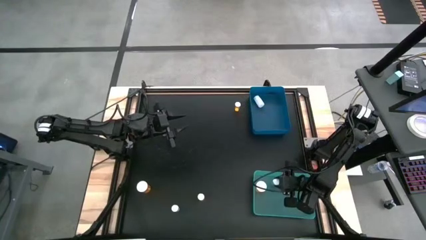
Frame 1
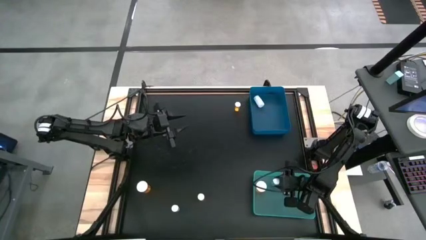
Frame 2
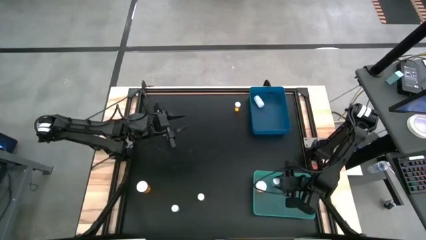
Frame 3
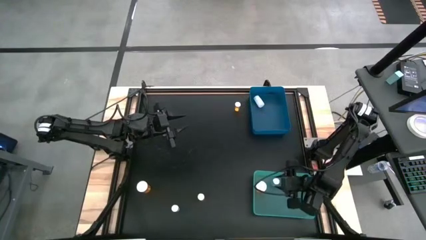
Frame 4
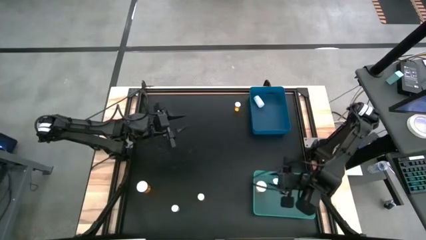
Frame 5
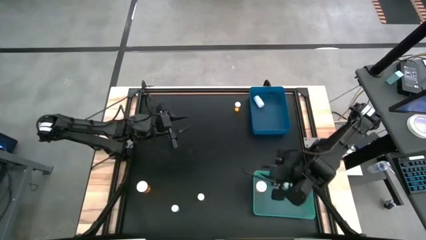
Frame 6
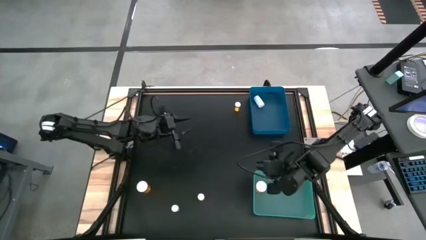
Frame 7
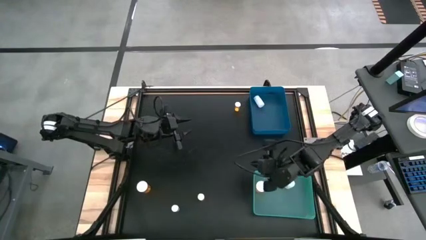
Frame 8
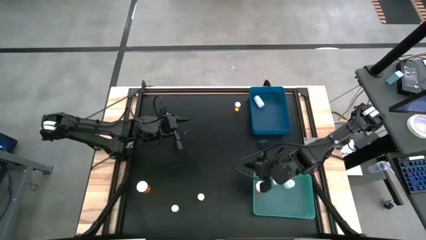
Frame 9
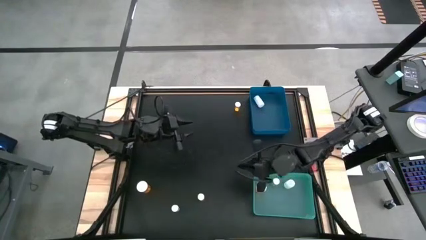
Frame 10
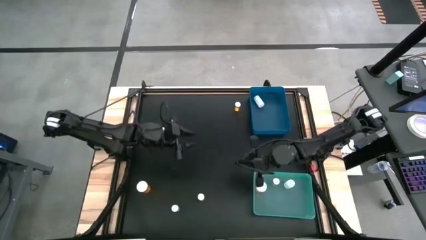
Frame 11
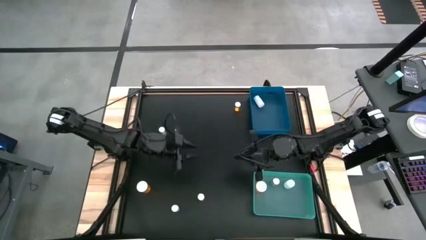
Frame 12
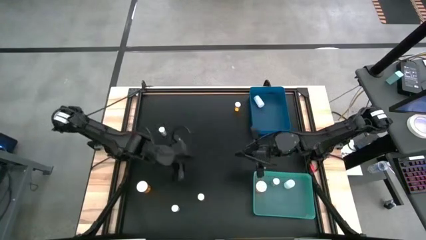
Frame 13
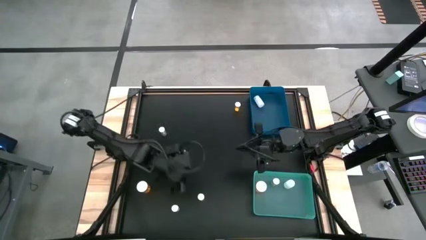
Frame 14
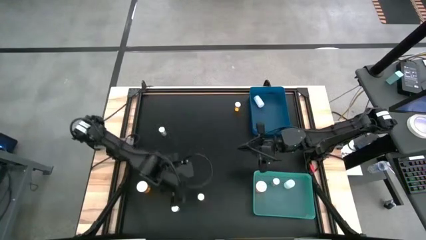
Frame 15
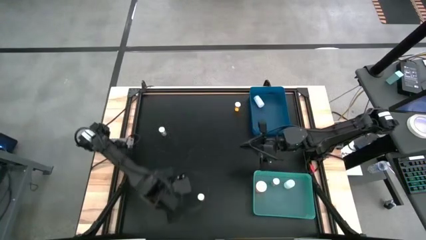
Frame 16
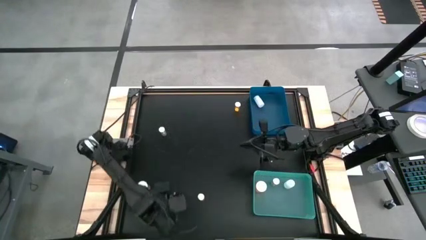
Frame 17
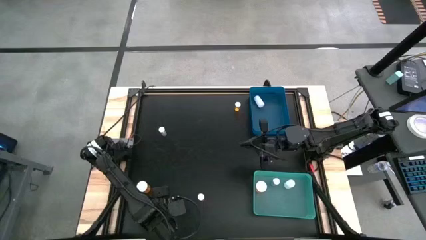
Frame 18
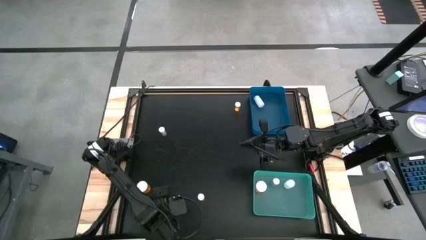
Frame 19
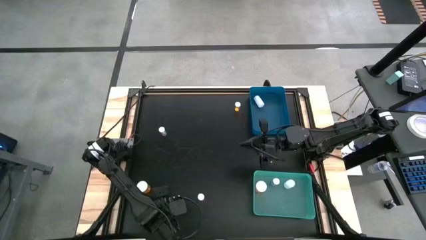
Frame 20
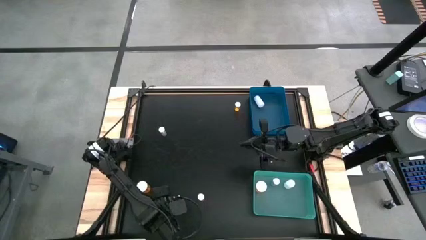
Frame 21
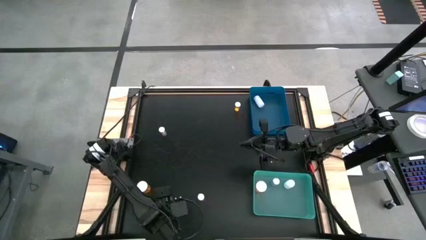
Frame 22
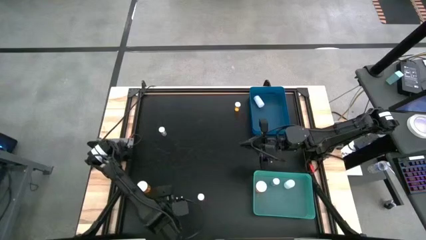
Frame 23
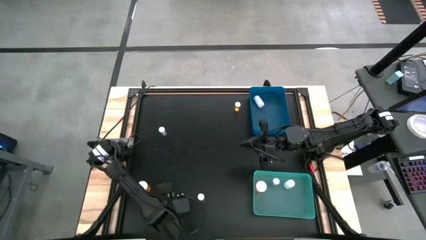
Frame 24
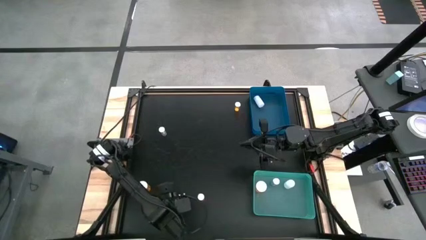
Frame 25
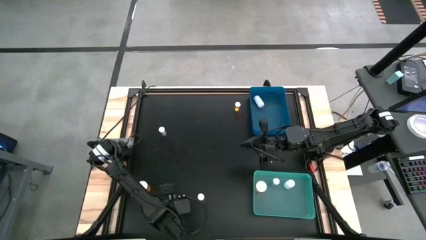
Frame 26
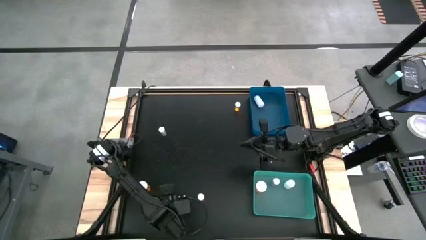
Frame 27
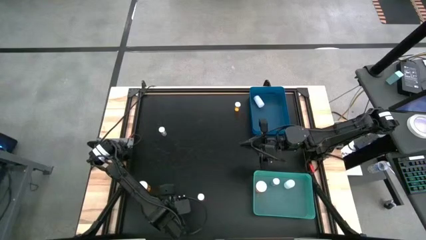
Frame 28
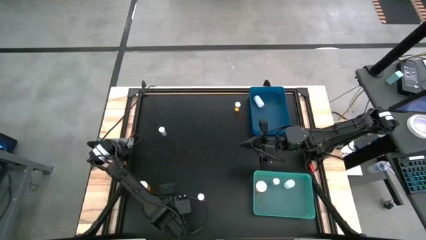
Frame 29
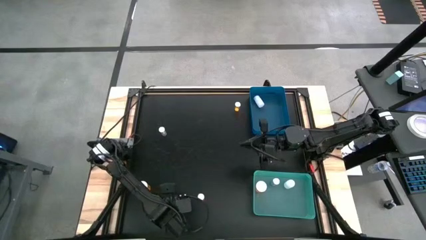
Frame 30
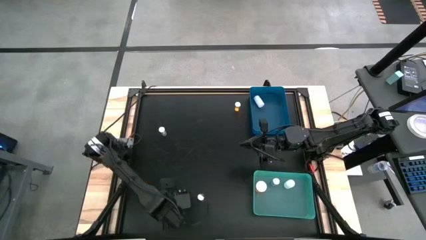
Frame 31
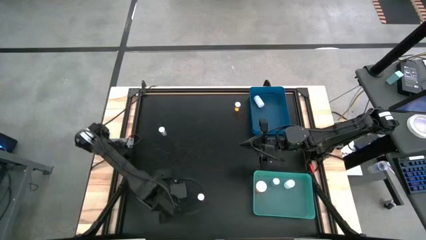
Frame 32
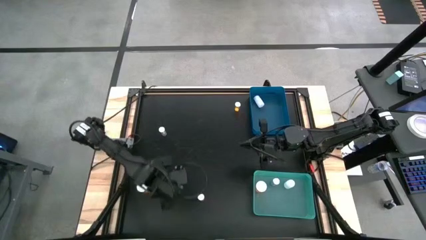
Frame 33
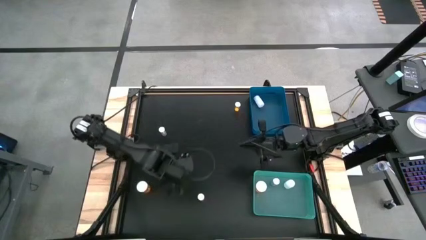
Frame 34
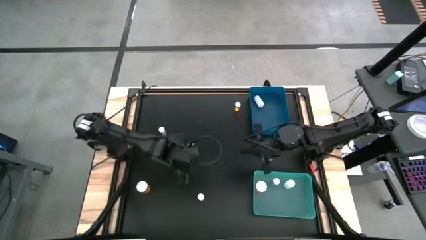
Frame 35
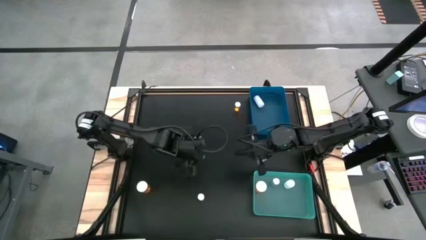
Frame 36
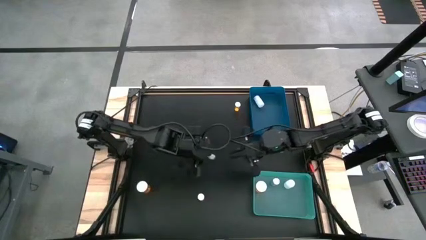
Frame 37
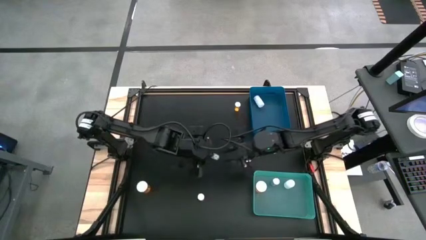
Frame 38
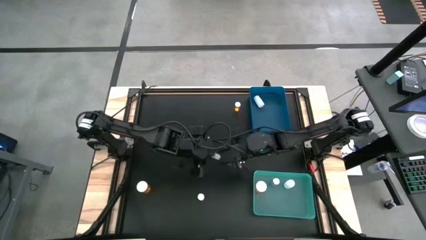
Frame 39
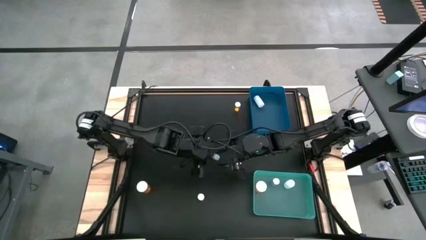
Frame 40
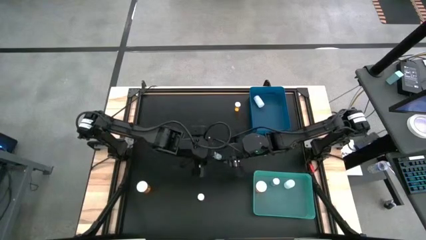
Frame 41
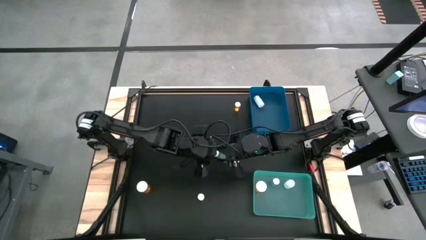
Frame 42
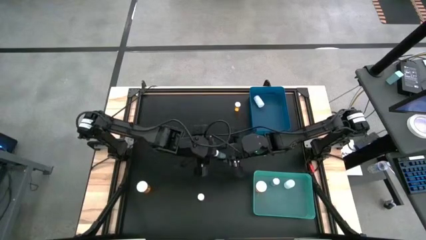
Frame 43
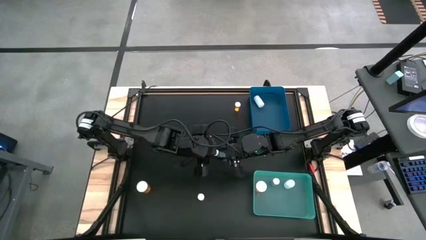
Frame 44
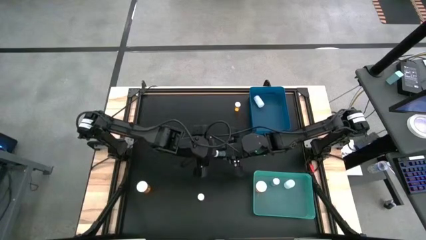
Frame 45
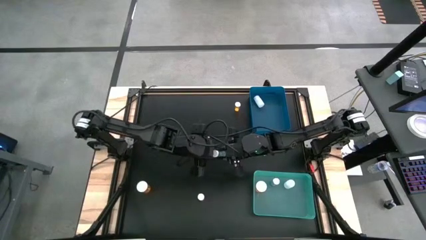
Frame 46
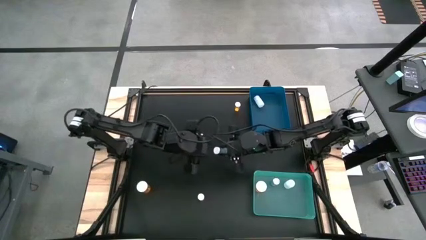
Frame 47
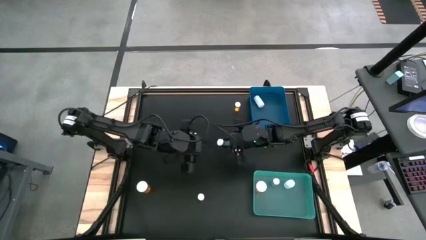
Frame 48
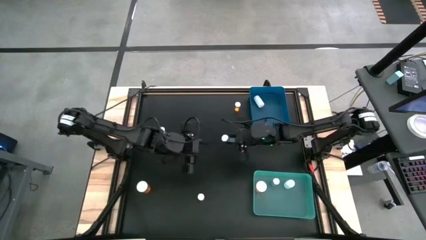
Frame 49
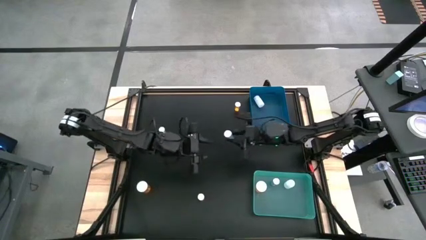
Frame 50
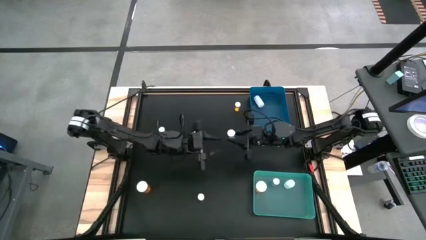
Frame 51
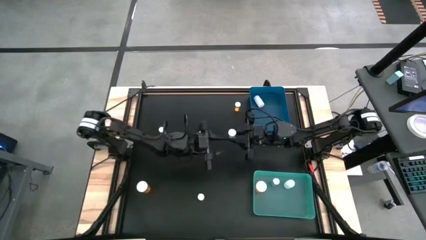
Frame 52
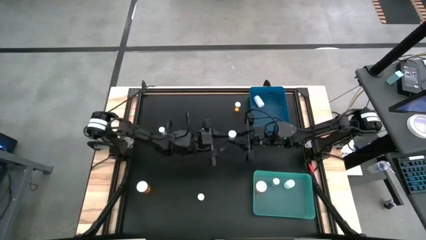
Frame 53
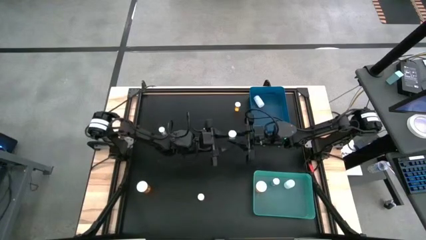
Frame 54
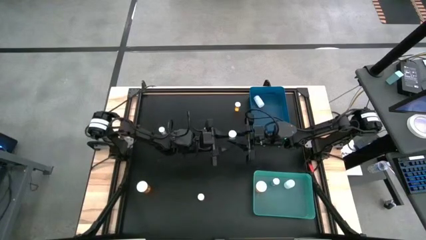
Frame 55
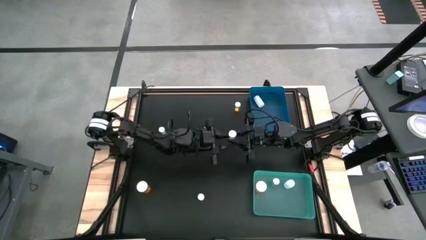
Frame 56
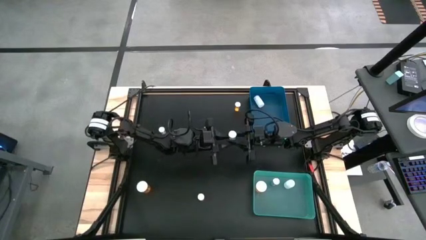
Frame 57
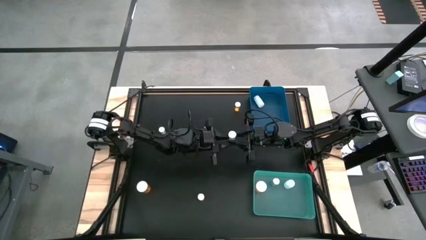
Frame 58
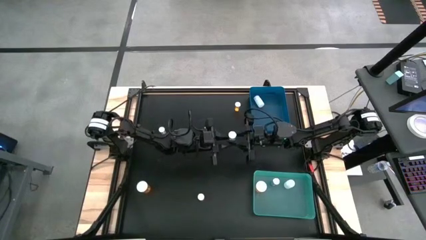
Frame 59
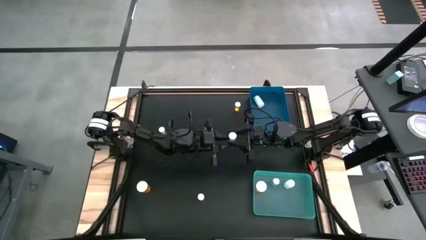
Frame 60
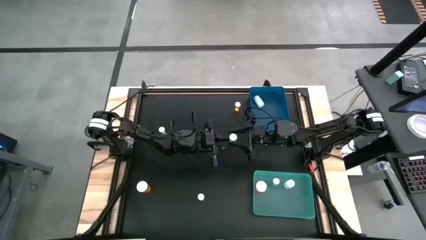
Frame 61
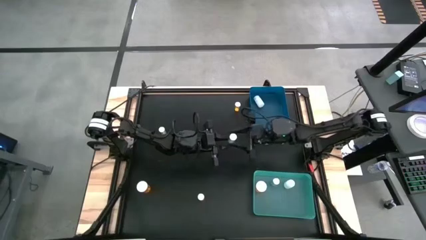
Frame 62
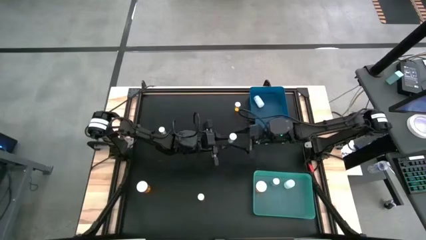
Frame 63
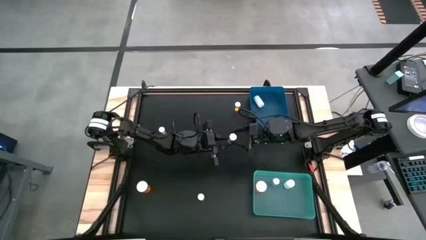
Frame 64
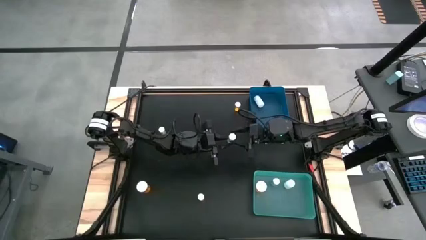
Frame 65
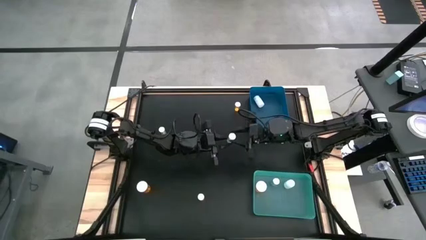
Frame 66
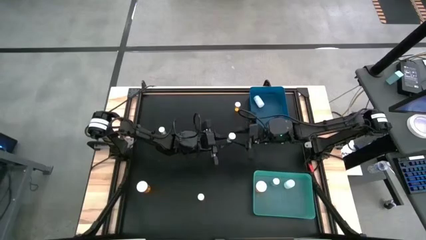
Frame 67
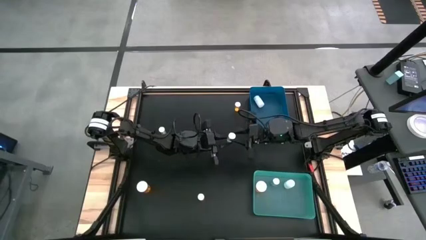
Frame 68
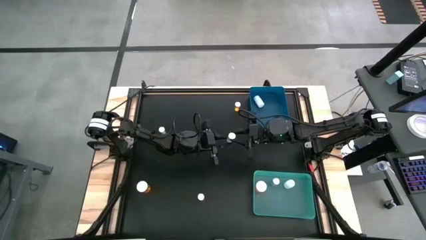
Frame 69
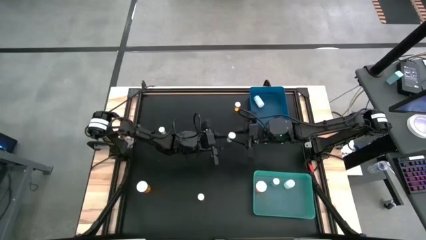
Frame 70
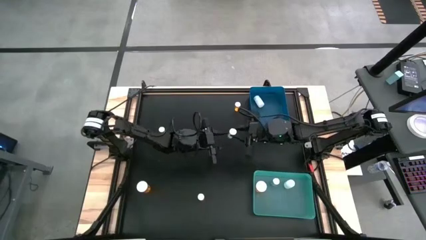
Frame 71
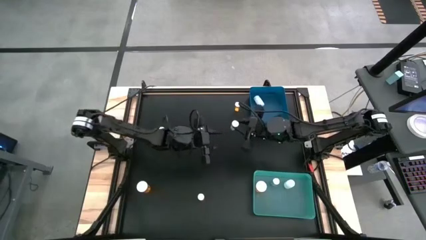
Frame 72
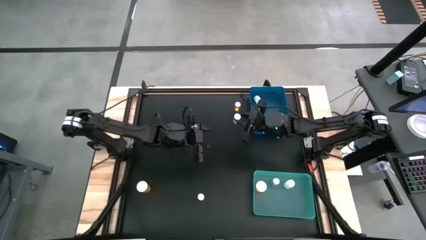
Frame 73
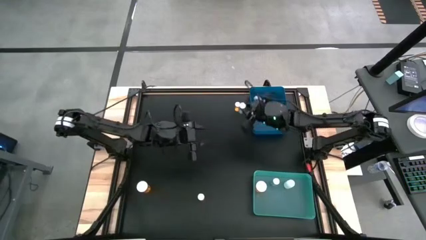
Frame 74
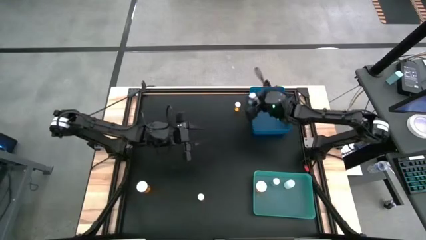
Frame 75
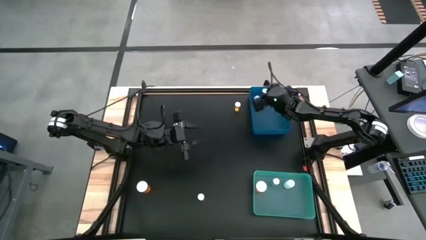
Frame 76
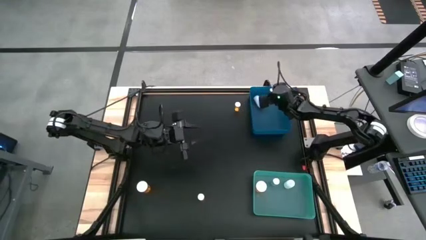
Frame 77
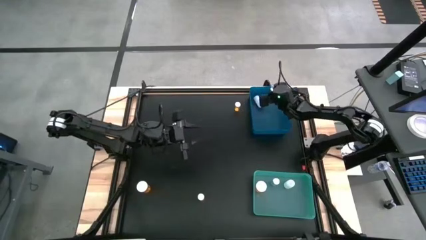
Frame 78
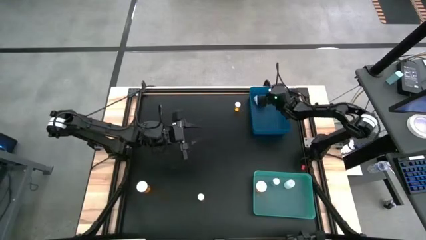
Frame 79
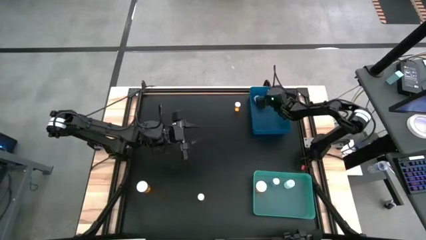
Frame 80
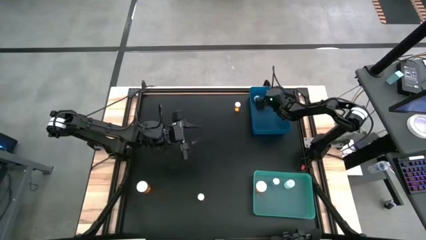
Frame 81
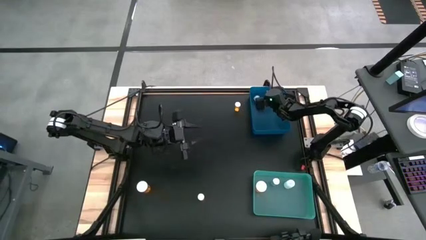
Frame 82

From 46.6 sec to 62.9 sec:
Task: Pick and place medicine bottles into bin by pill shape (circle, oval)
Put the bottom light green pill bottle into the blue bin
